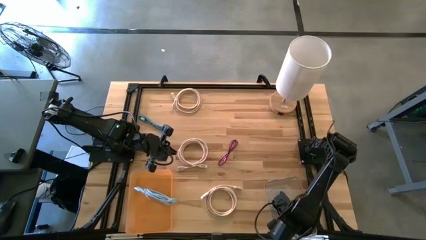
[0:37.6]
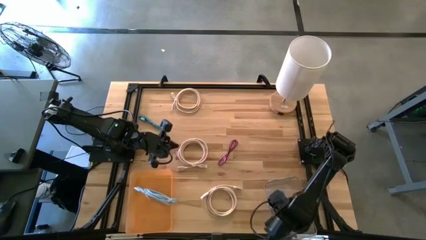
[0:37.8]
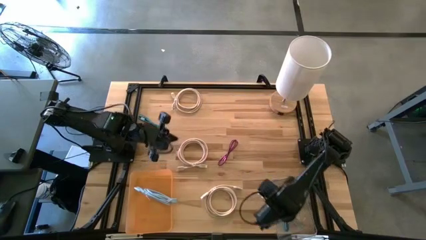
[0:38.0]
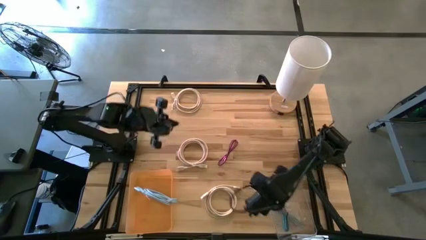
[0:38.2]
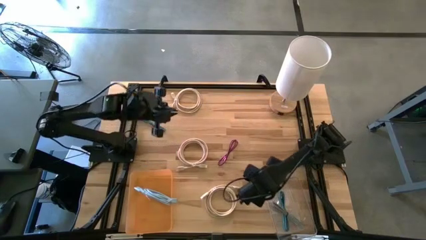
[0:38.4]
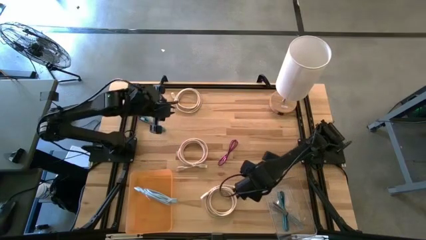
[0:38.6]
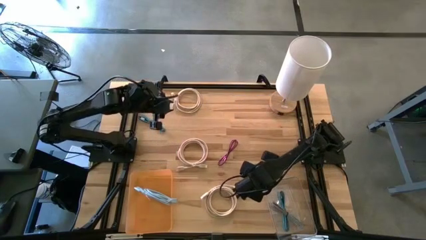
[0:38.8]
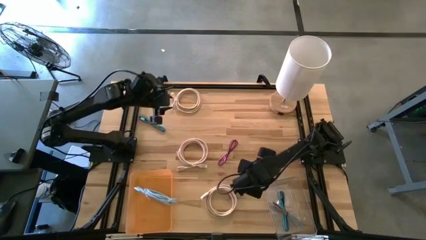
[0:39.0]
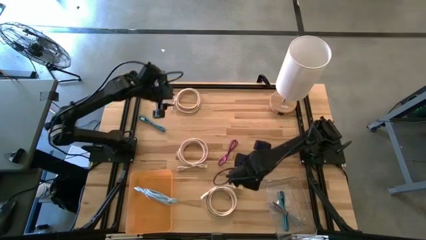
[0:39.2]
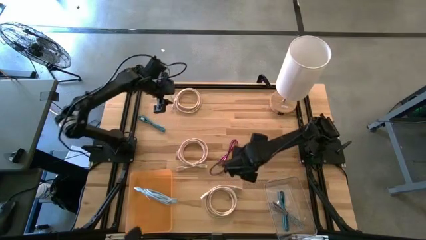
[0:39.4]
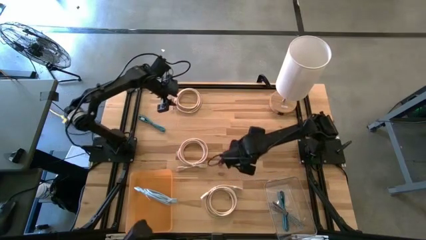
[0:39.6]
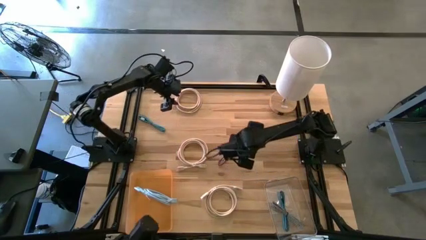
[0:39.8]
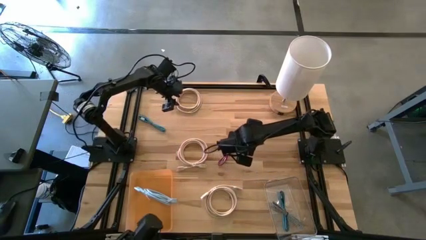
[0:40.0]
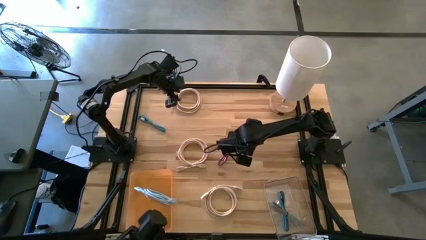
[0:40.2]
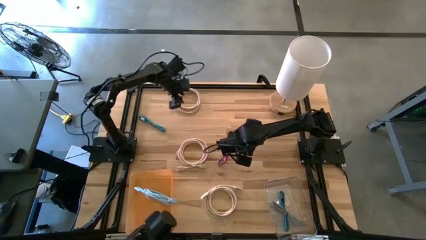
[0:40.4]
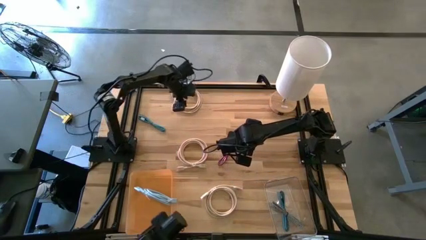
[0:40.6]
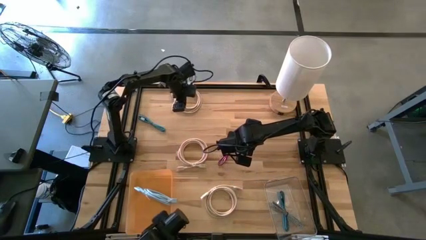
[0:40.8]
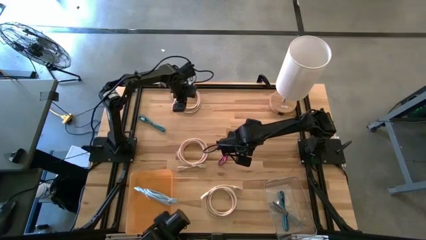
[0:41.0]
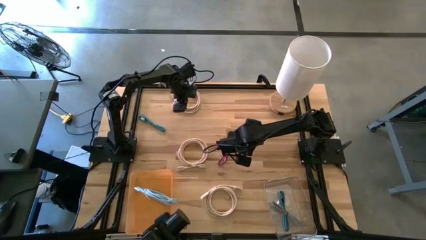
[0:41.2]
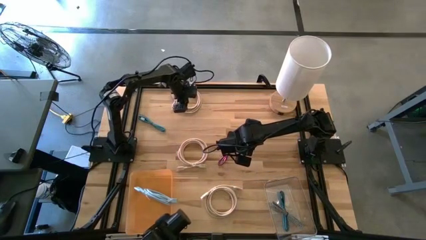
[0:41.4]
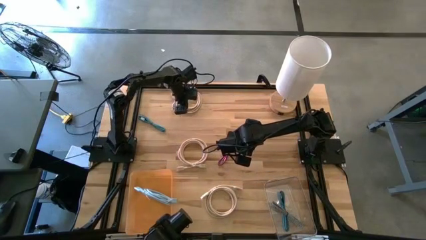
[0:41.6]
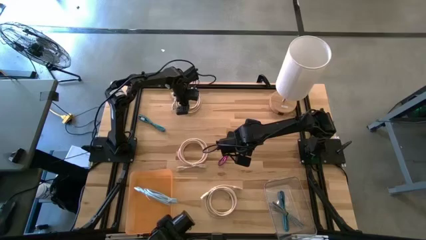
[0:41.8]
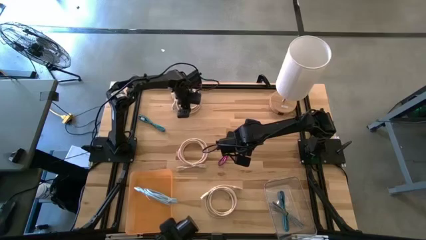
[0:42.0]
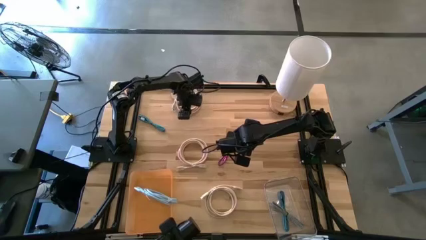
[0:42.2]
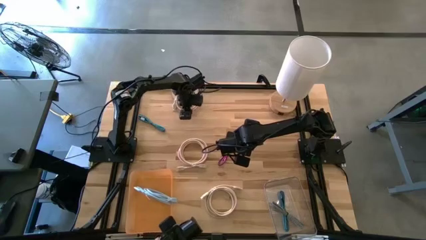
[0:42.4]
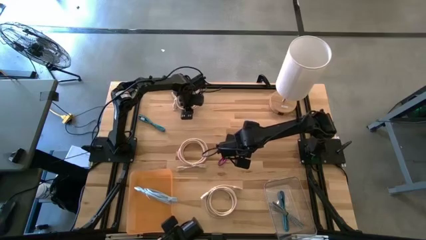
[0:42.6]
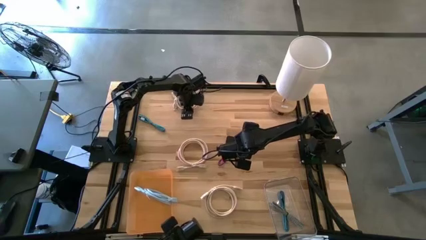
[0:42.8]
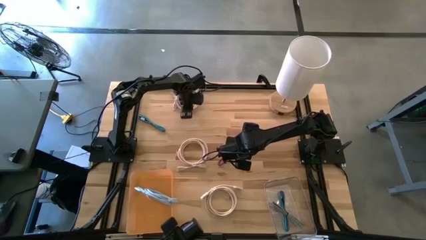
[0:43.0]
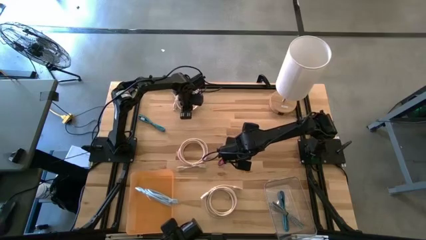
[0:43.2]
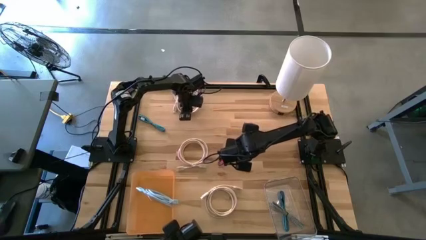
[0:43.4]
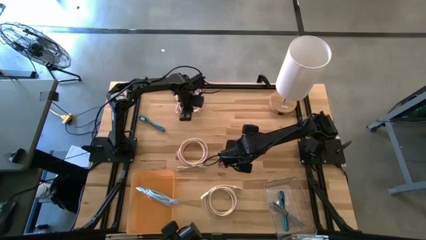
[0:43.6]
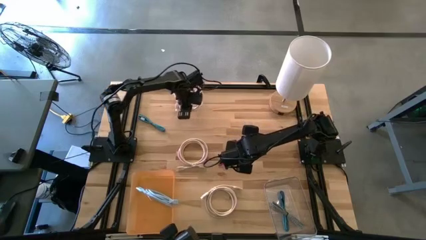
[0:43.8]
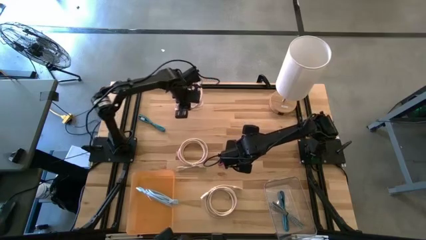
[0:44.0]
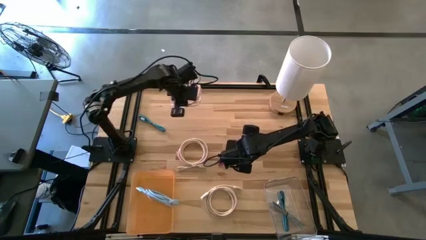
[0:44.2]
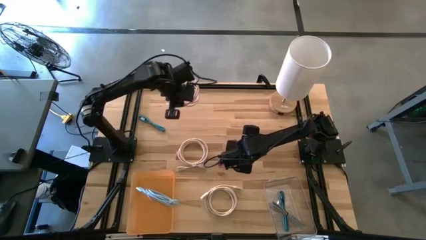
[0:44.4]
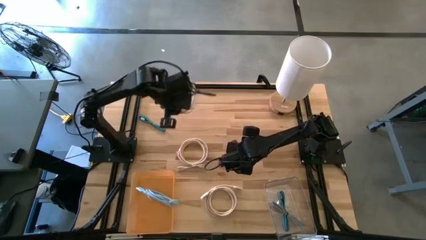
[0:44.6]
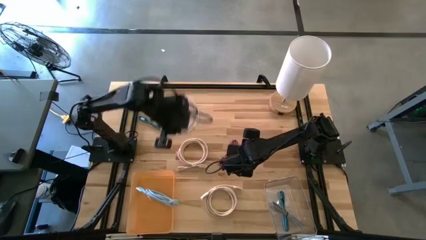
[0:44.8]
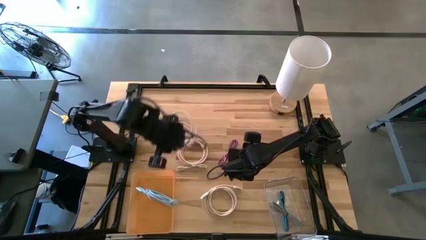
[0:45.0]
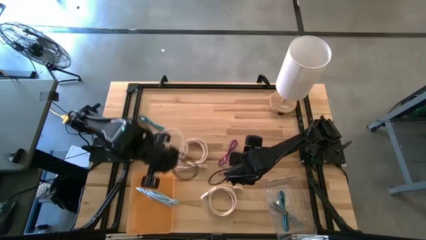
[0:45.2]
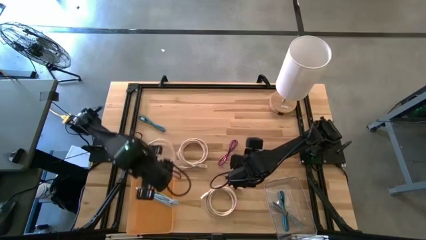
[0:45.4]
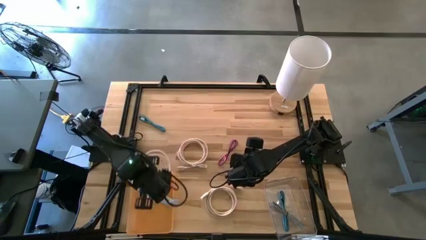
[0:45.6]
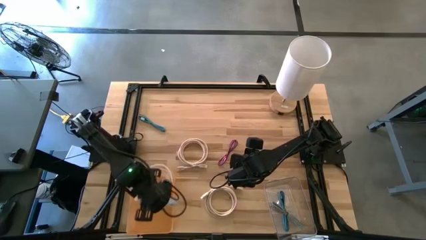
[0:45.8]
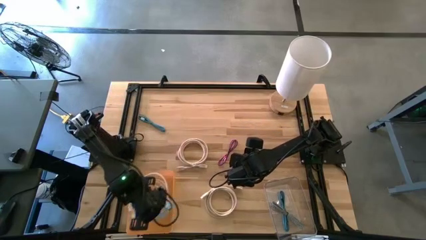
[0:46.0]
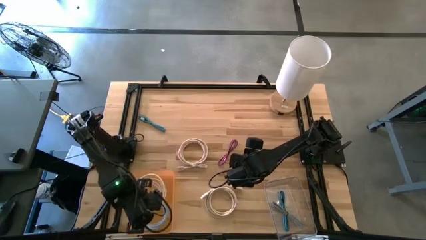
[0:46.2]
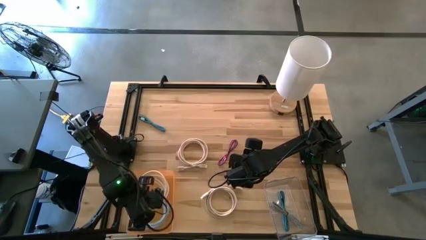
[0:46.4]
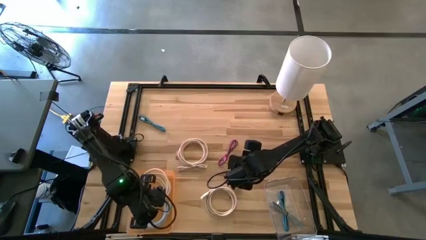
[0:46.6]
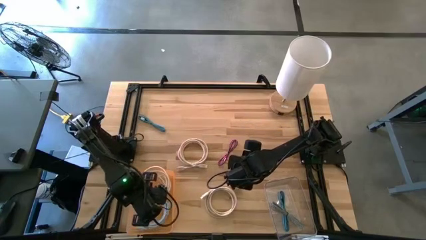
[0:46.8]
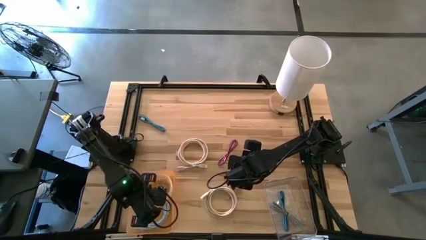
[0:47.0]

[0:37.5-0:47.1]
Task: Pick & Place USB Port
Put the top left light brown HDMI cable into the orange bin

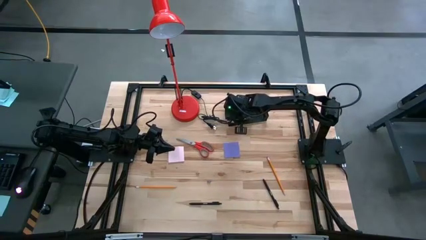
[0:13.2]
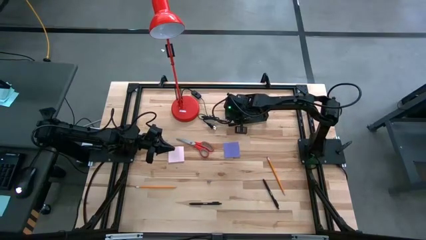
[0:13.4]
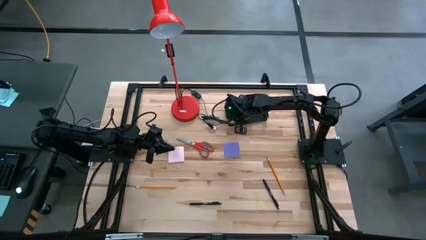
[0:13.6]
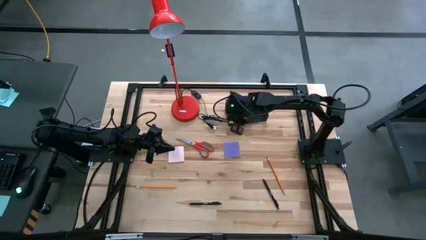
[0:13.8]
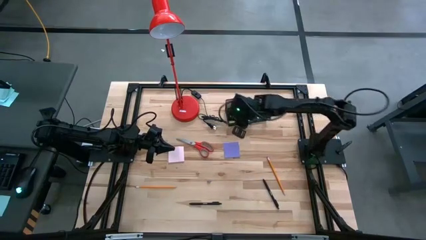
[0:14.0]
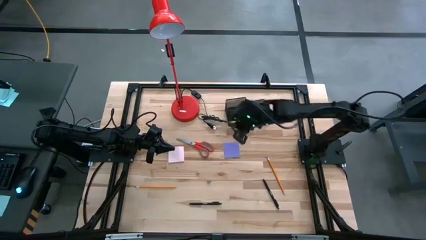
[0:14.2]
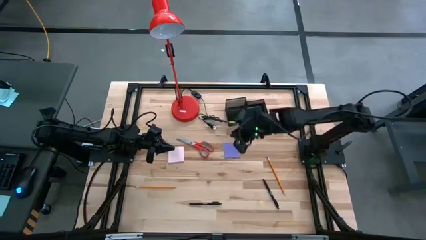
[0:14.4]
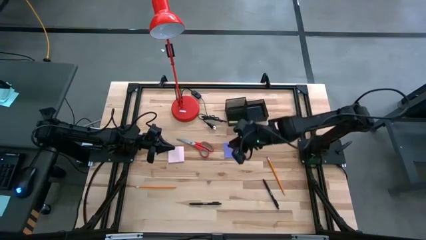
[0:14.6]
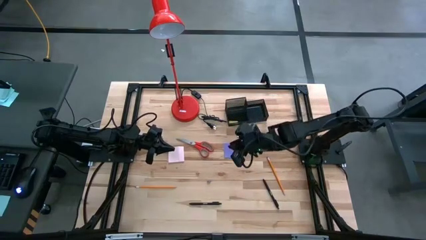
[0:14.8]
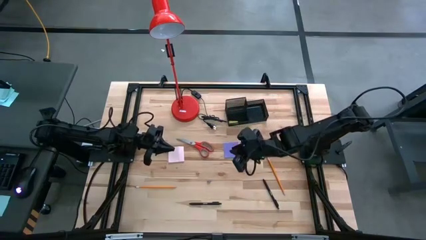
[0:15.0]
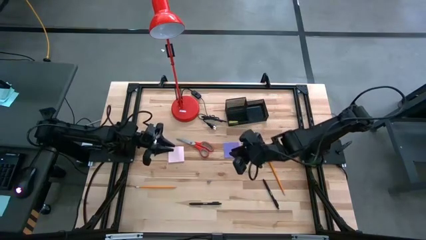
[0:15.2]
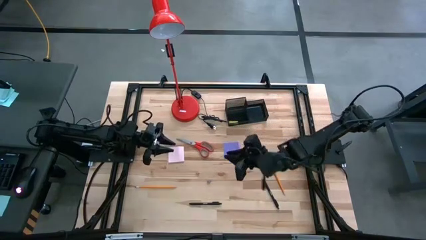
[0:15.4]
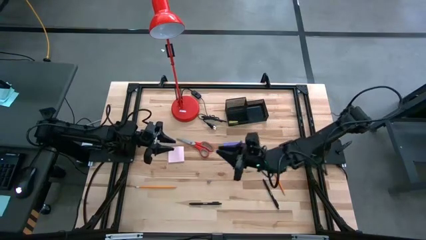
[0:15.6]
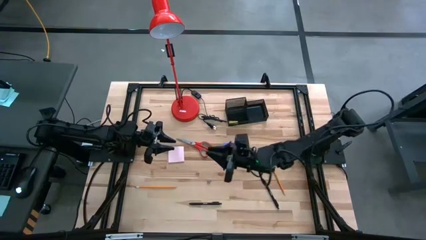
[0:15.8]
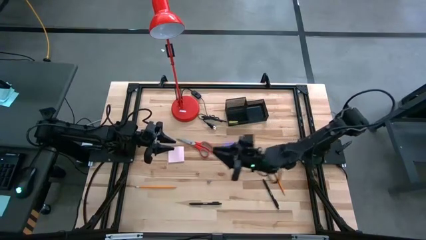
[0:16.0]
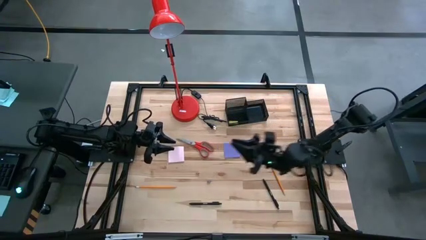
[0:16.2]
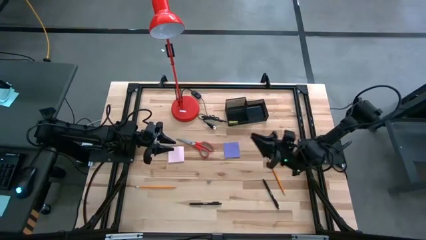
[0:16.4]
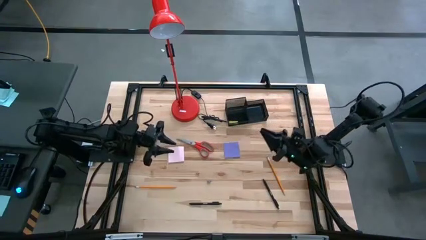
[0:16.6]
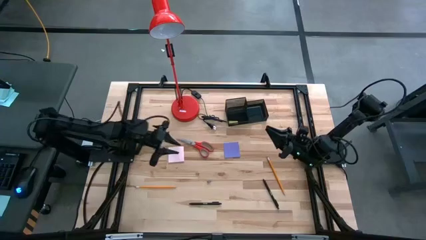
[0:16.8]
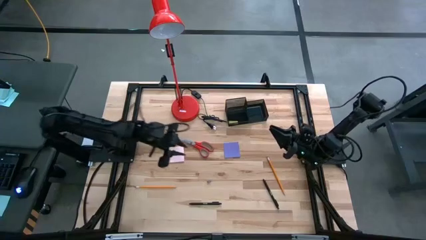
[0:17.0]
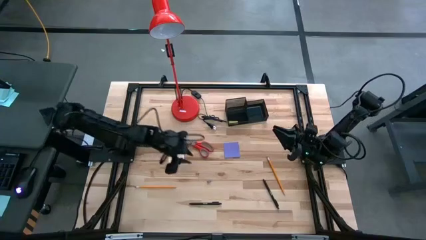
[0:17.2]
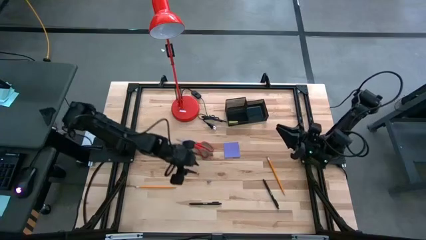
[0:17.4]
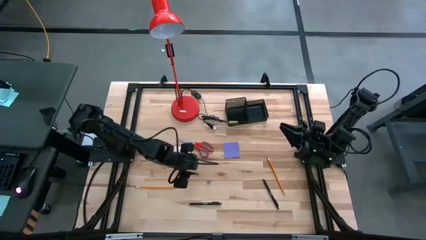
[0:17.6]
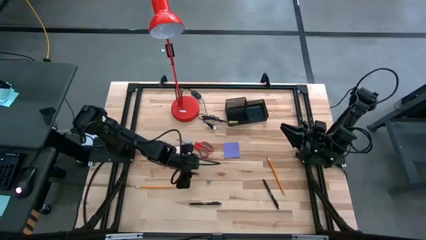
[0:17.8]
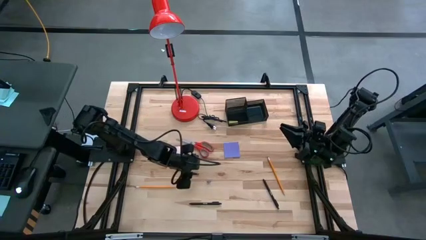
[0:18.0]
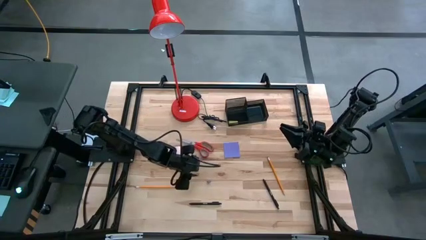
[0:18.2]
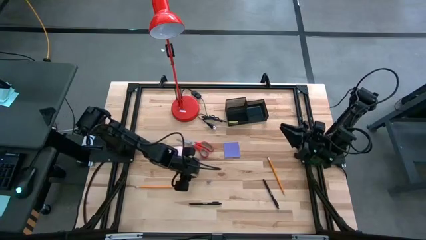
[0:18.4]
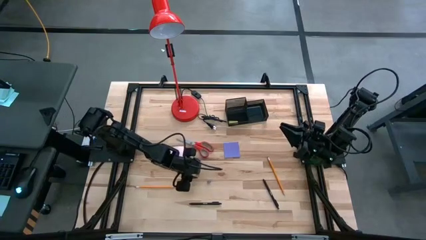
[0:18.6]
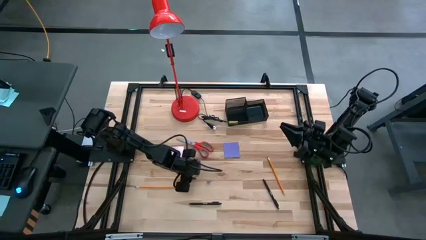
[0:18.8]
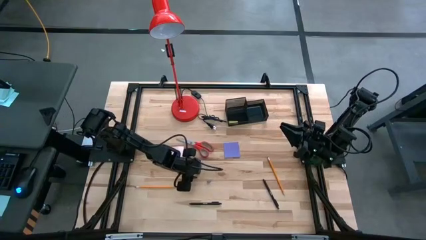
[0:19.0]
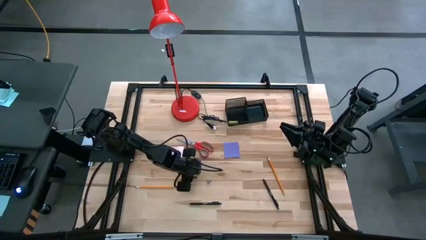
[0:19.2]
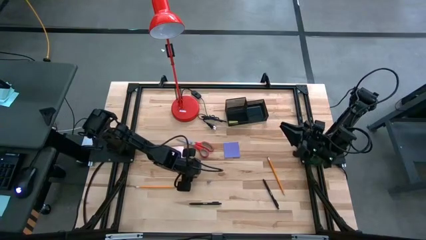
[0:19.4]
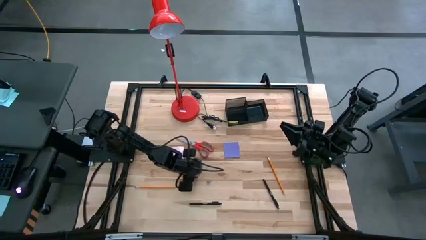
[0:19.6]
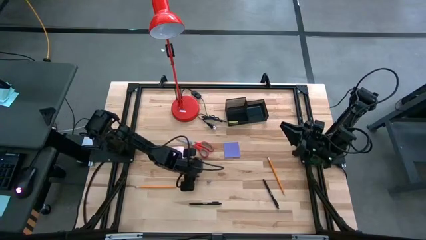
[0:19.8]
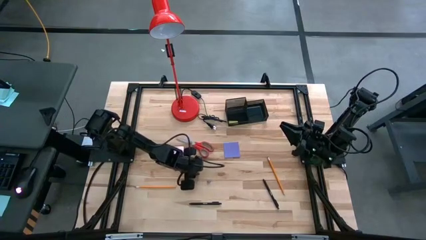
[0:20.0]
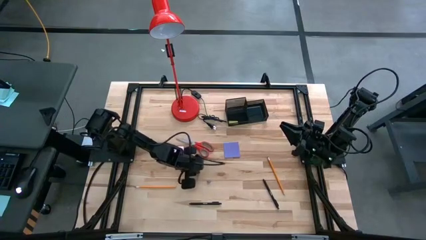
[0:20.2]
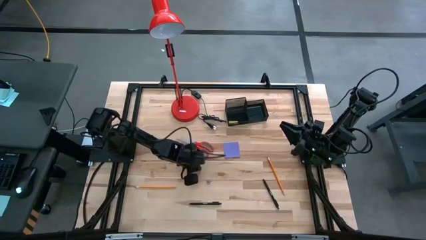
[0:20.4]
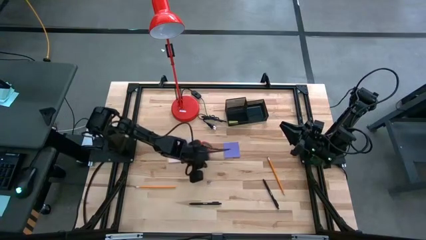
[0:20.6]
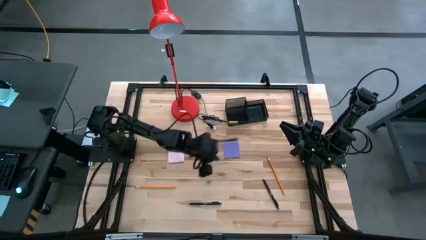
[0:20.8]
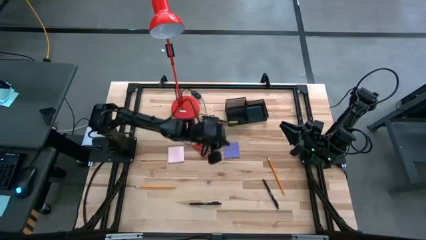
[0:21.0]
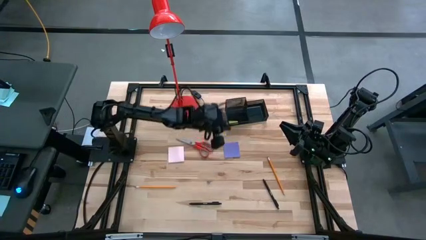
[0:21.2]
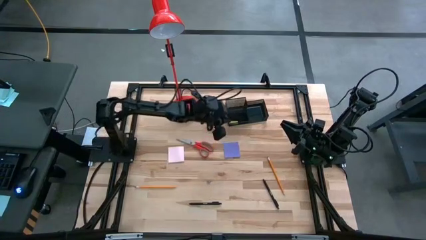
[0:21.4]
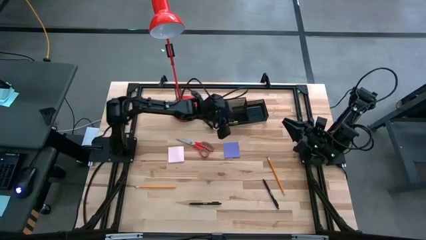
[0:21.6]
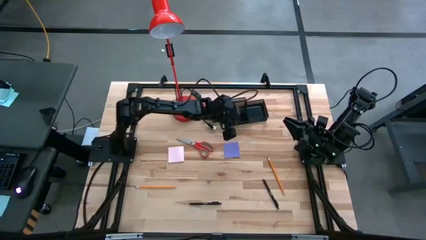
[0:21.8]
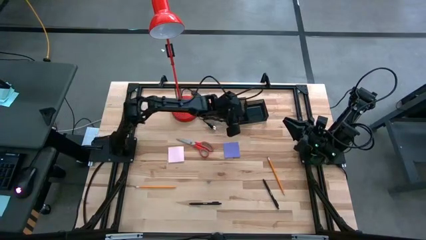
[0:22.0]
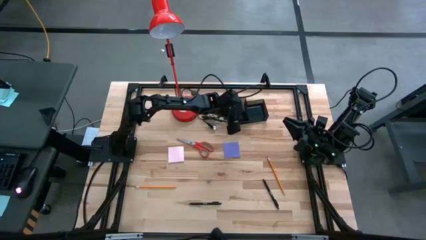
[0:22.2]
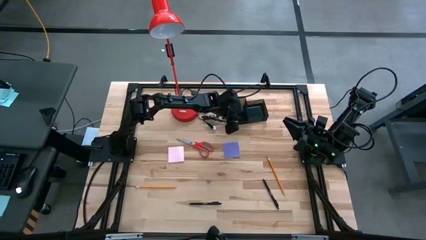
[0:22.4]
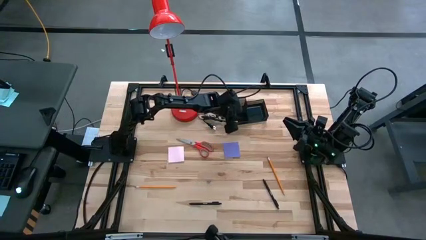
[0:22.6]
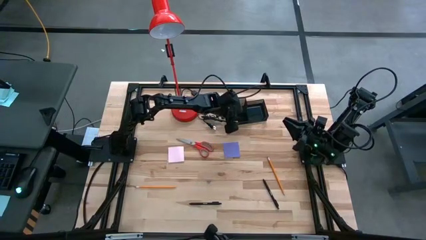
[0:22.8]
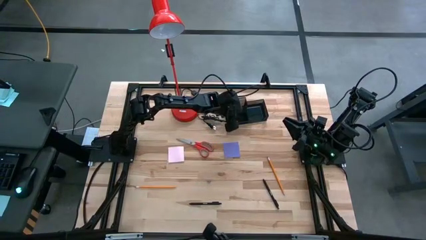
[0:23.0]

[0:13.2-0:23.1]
Task: Pick and place office supplies into organizer
Put the pink binder clip into the black desk organizer
